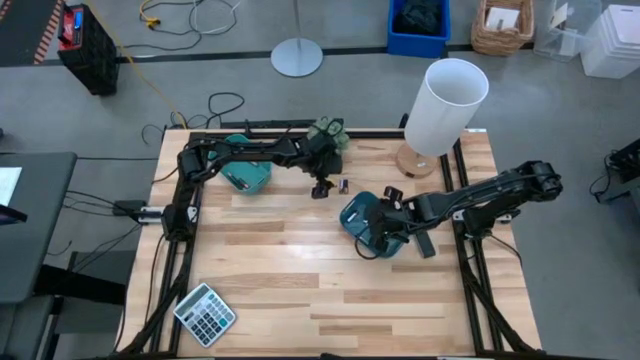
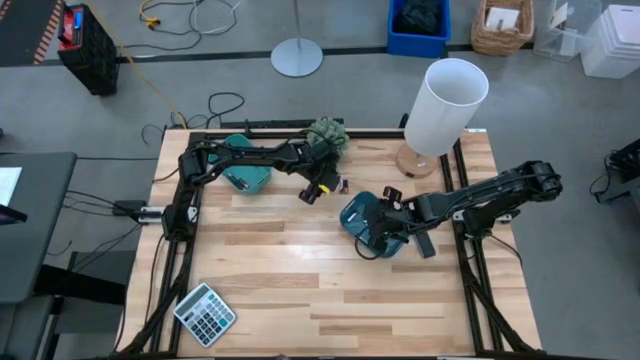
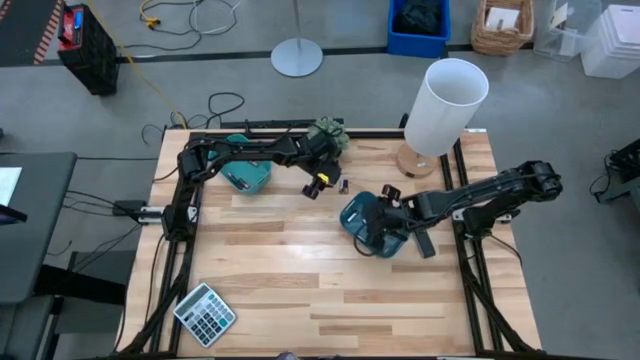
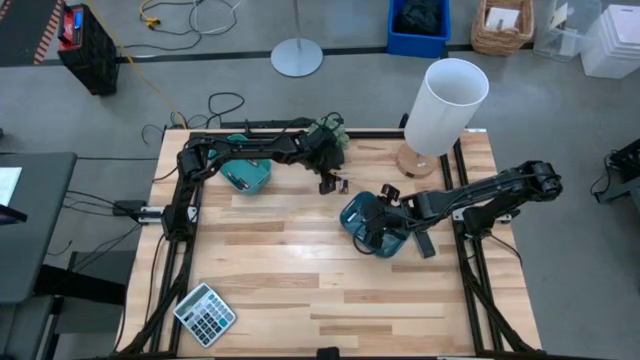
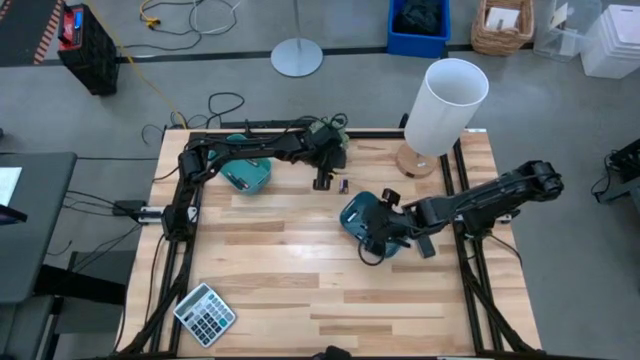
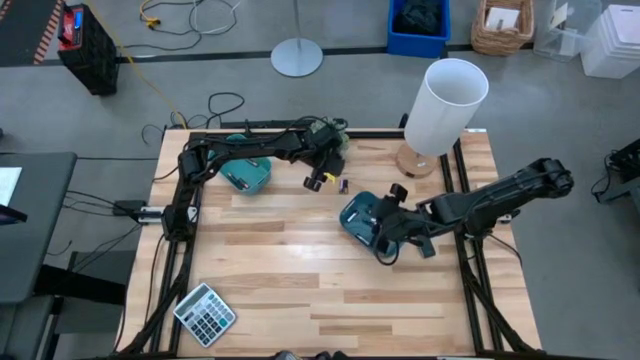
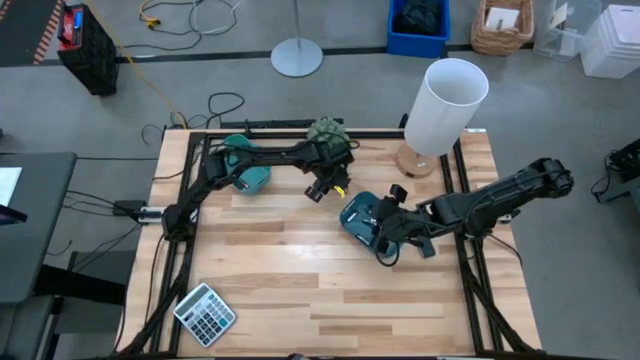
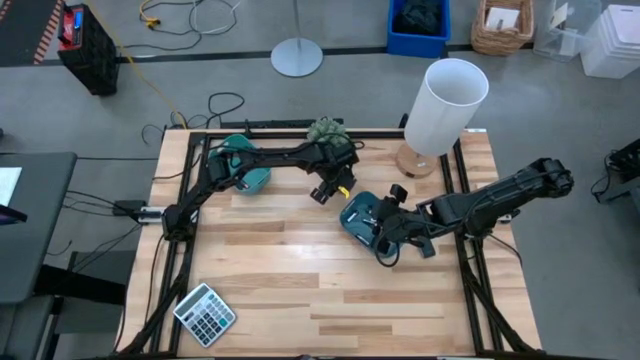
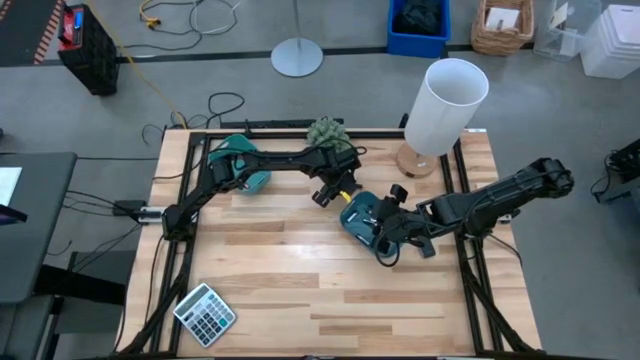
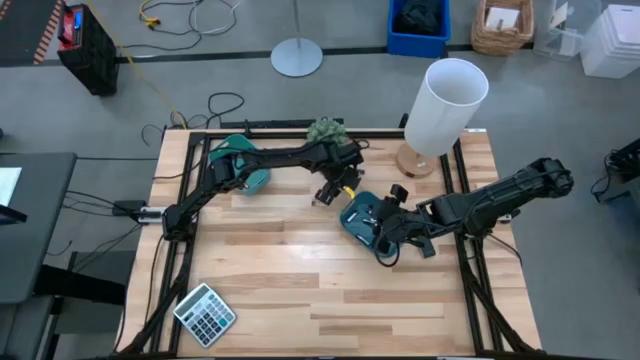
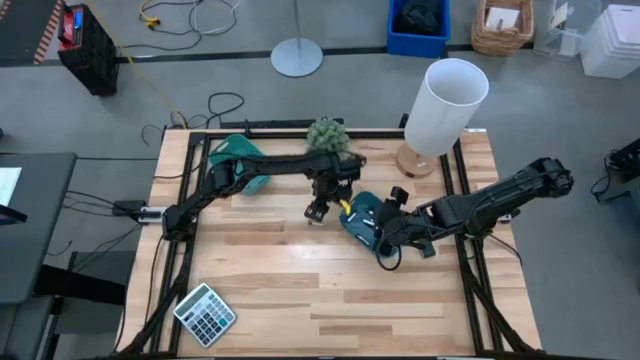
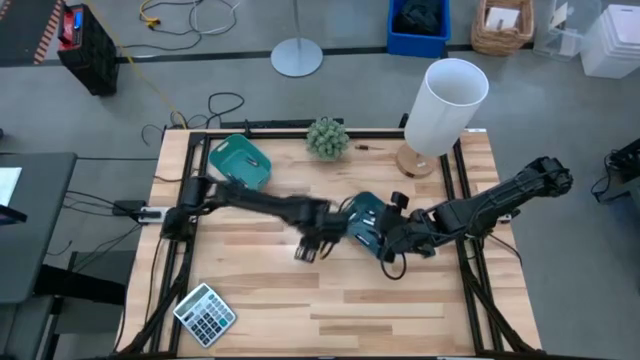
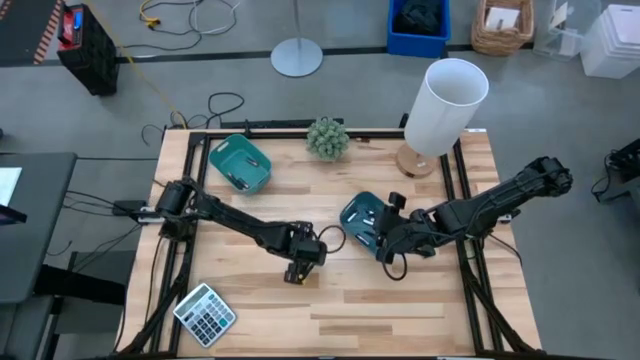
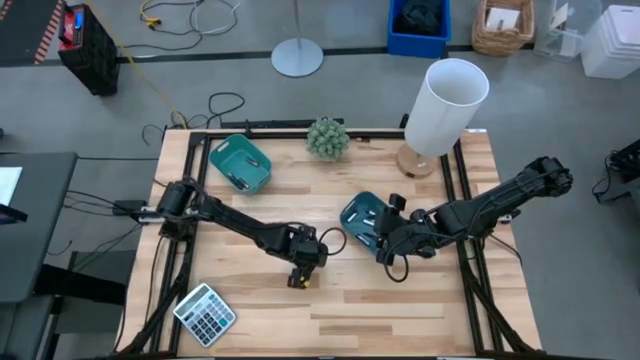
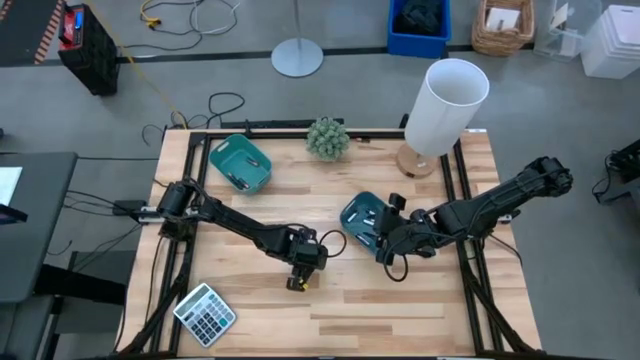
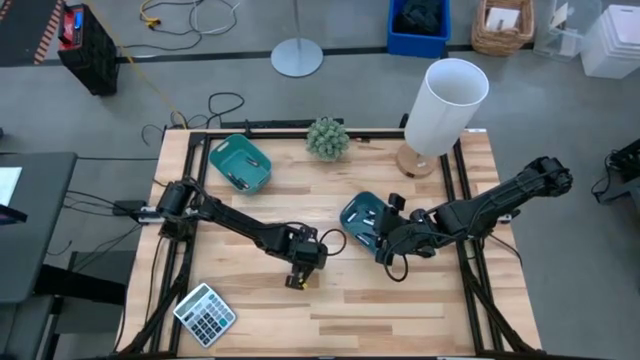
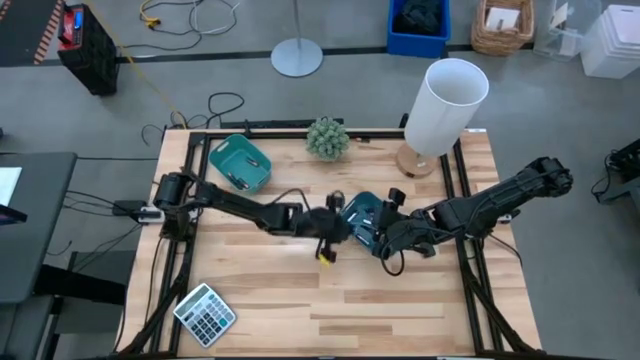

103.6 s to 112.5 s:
Task: Sort batteries
Put the silver battery into the blue bin

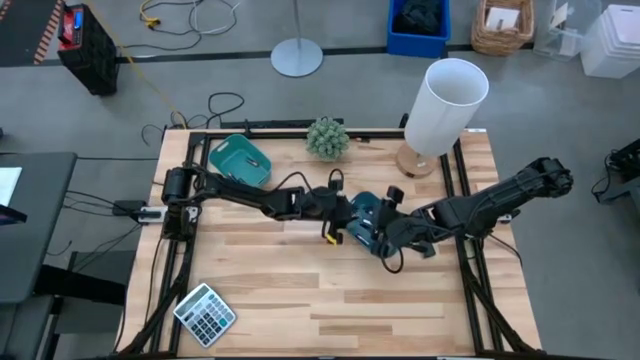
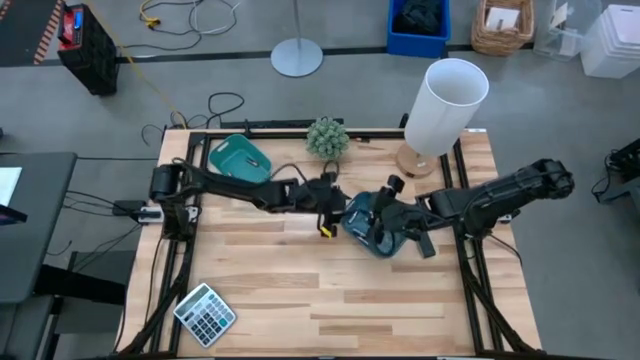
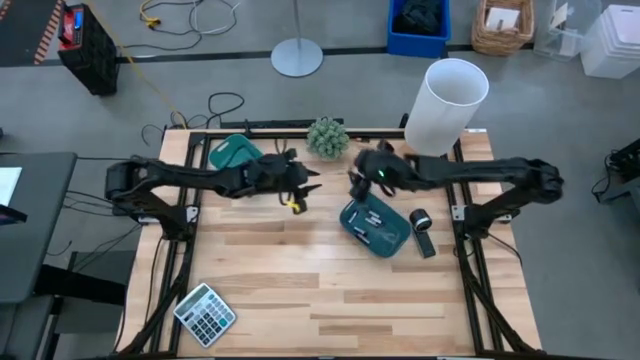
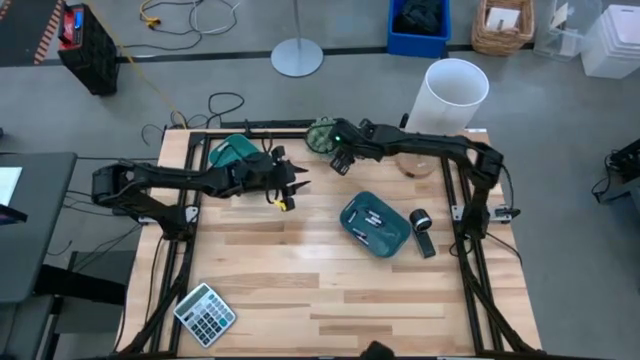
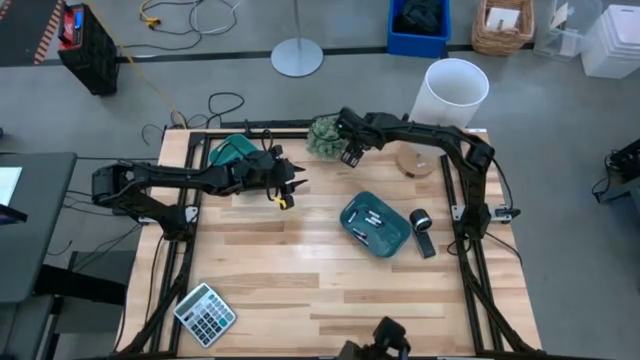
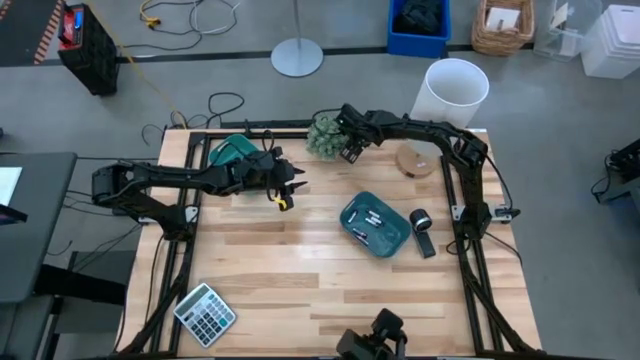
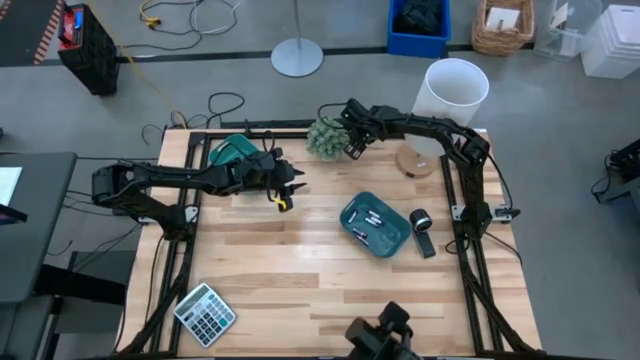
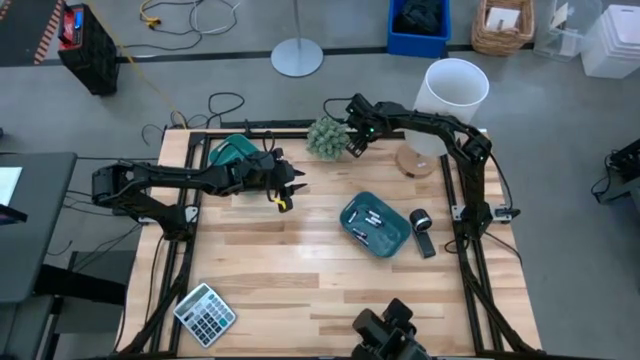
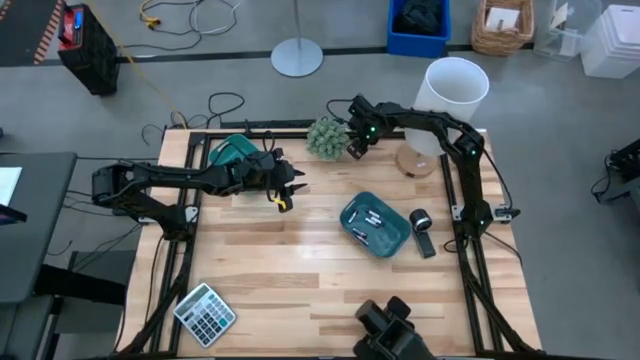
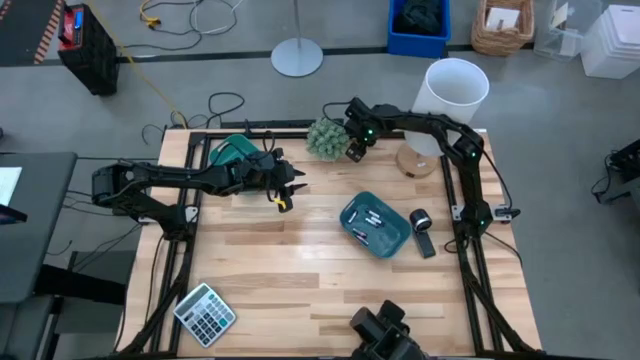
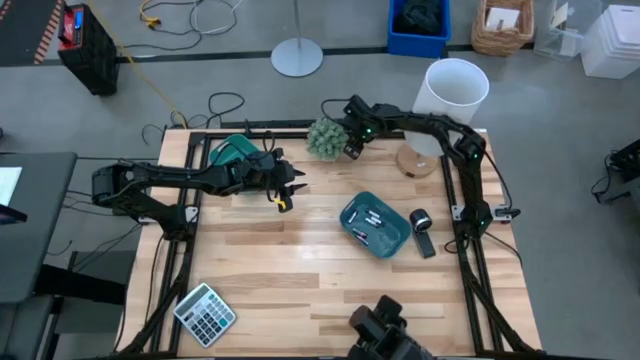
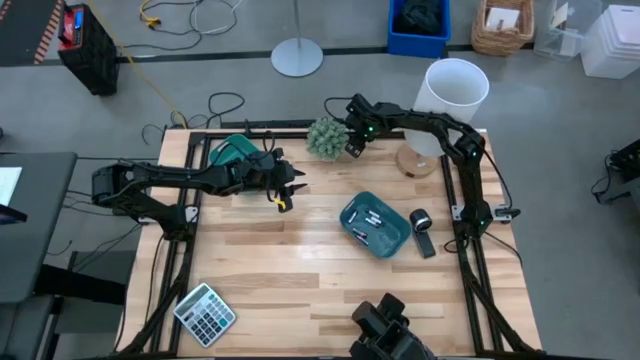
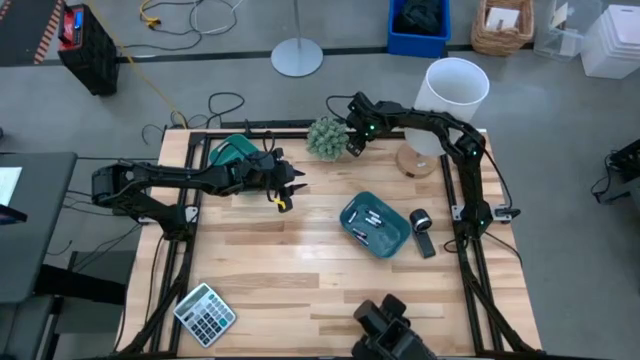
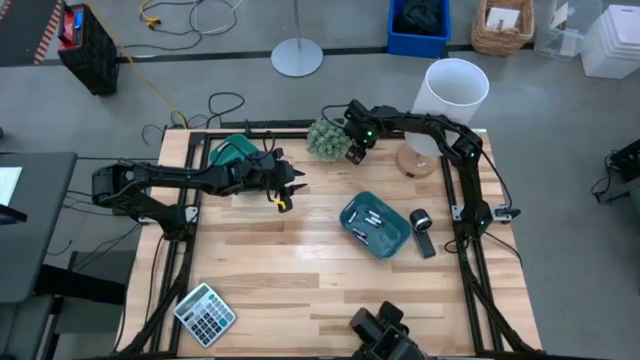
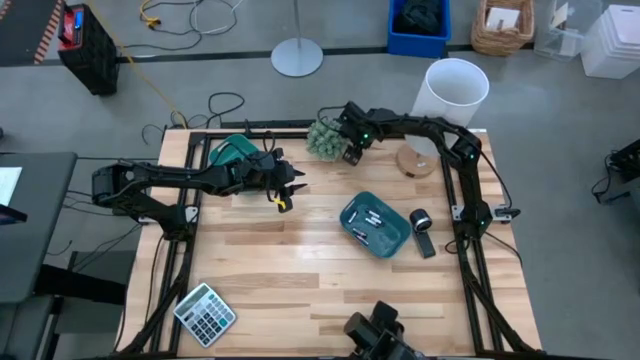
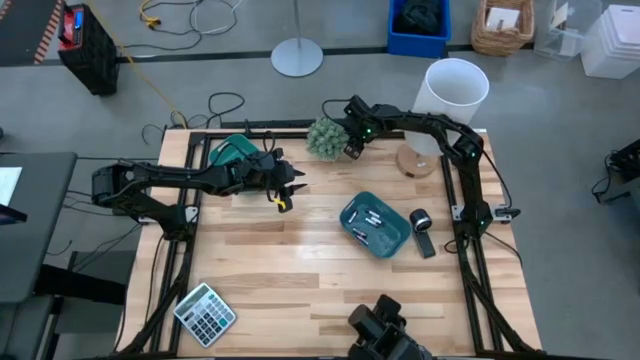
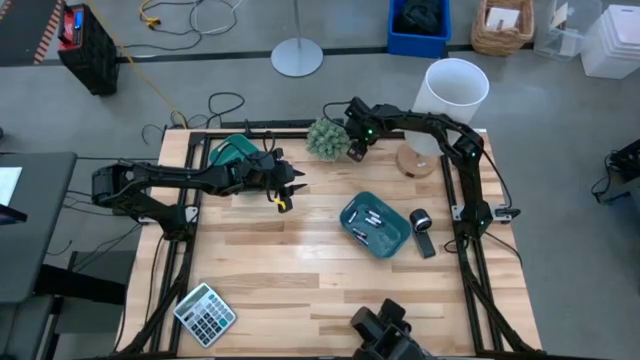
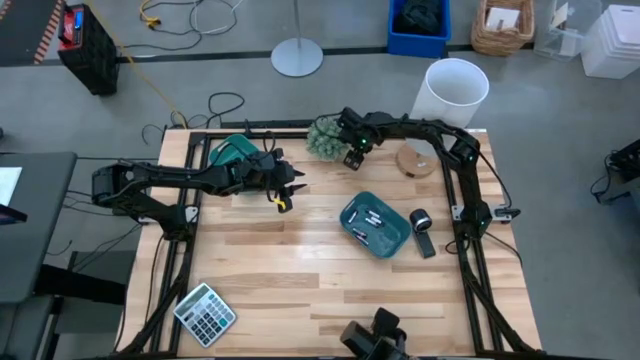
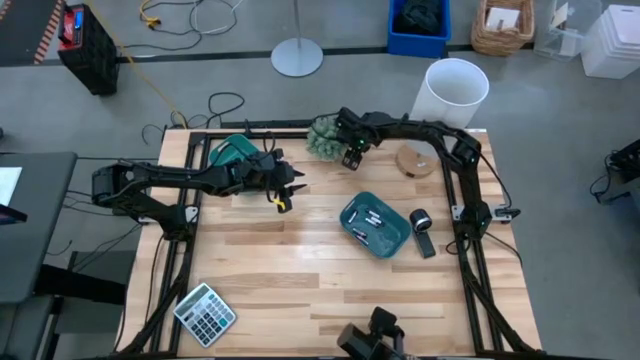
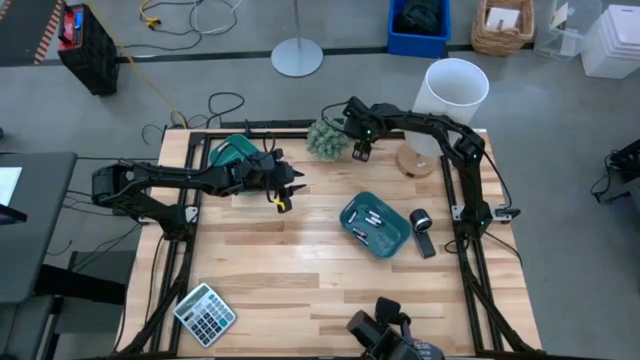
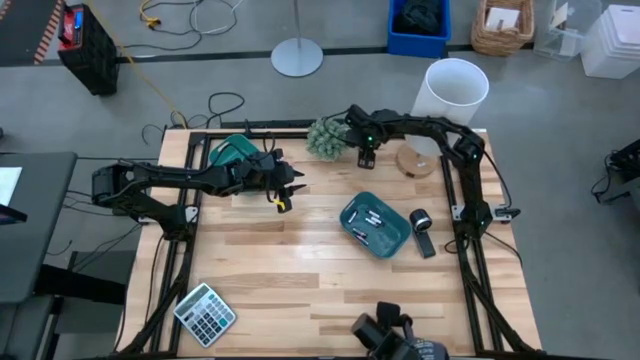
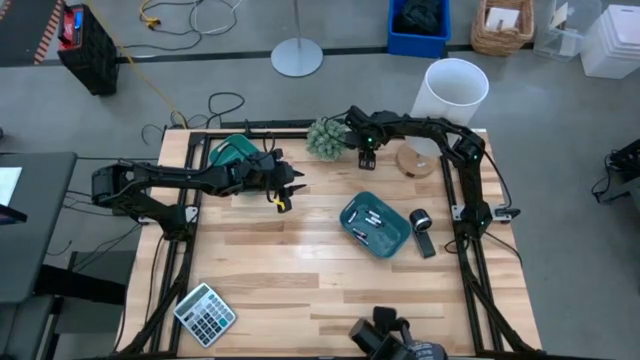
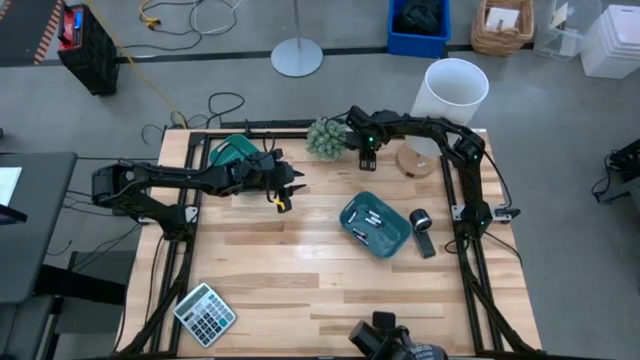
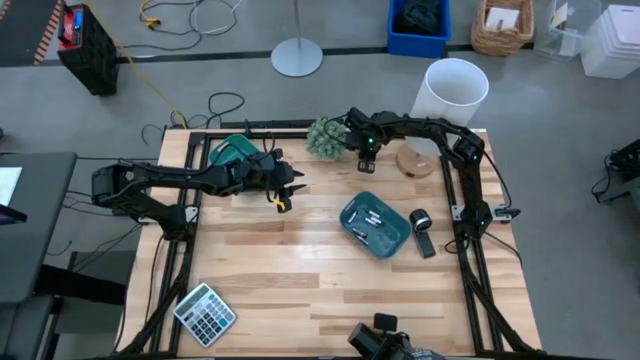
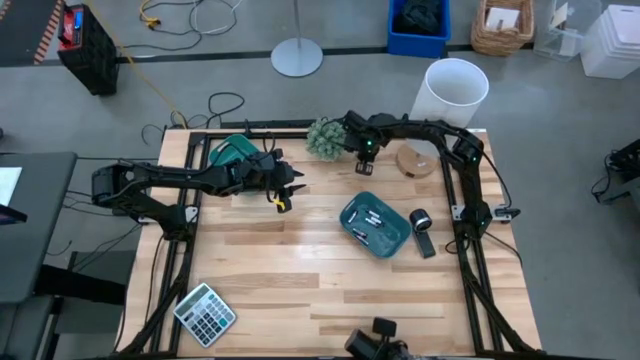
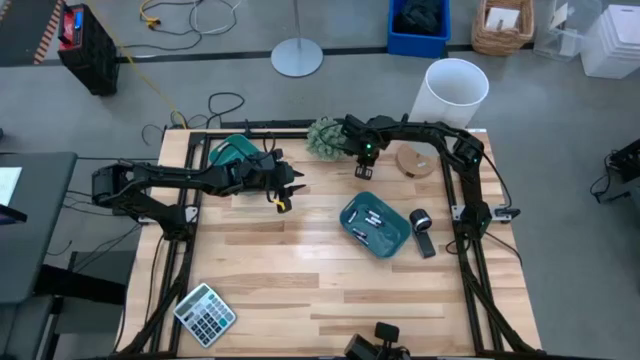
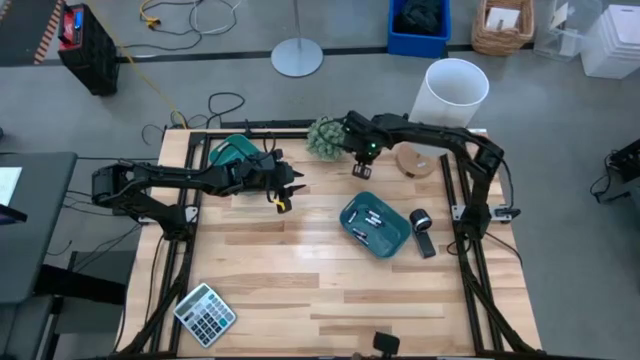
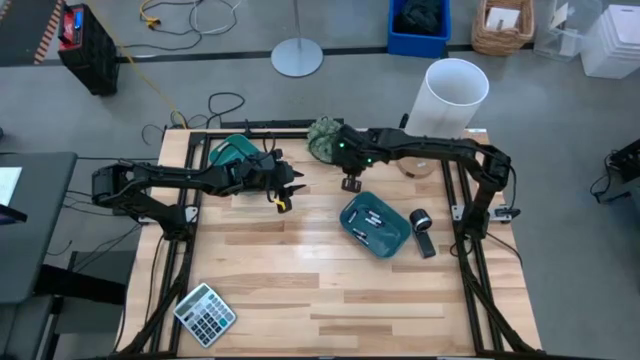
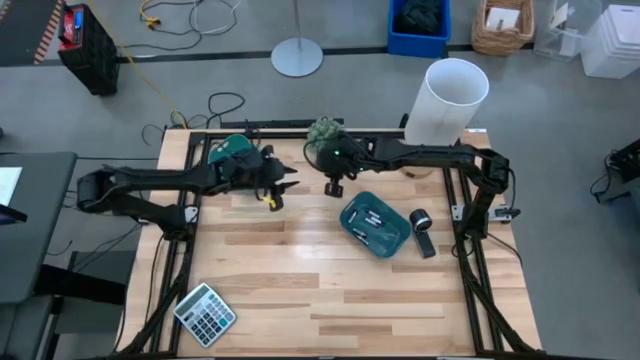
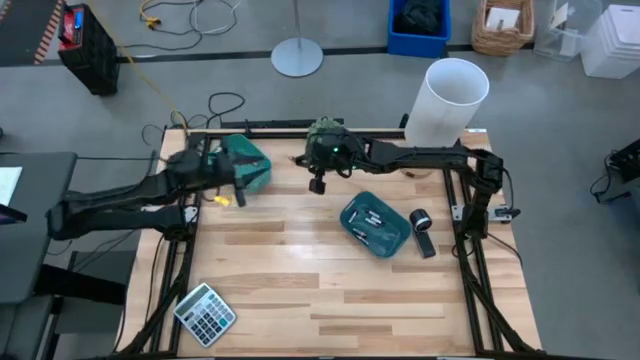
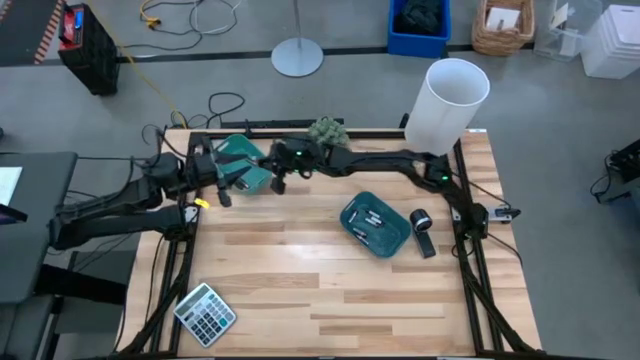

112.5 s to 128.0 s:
Put the black battery into the green bin
